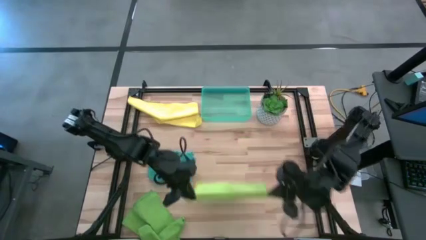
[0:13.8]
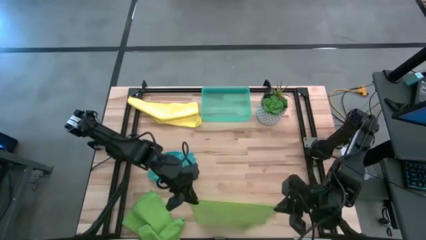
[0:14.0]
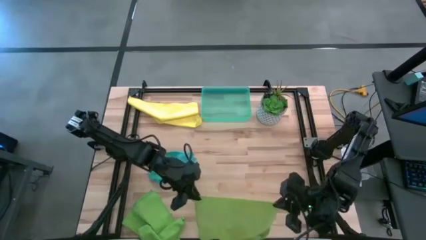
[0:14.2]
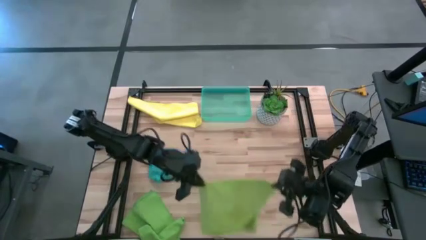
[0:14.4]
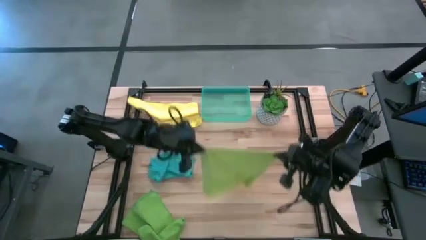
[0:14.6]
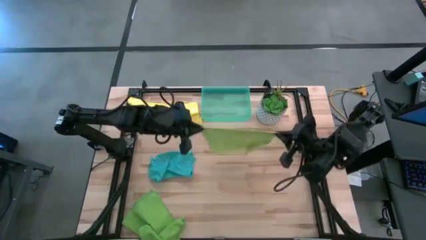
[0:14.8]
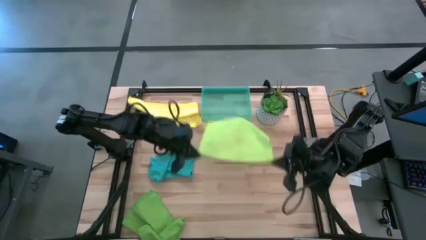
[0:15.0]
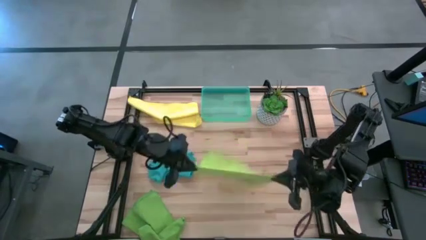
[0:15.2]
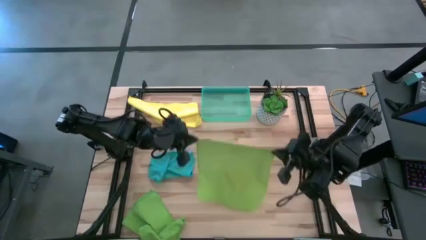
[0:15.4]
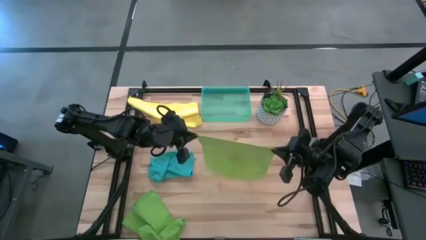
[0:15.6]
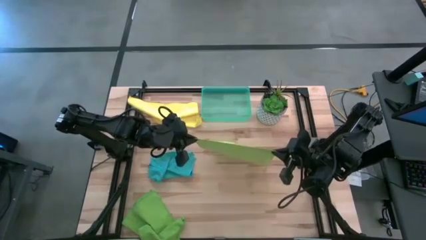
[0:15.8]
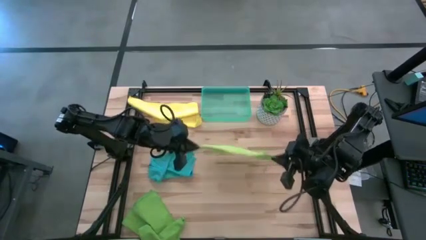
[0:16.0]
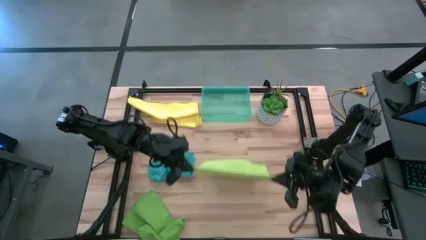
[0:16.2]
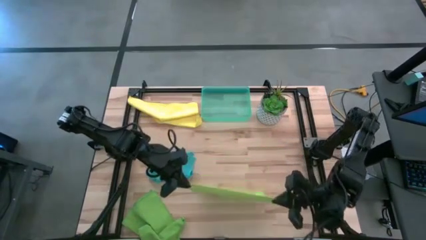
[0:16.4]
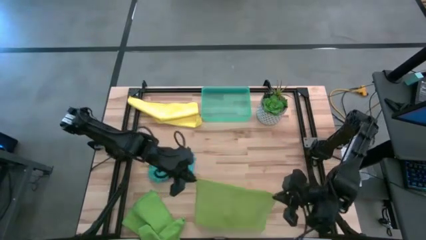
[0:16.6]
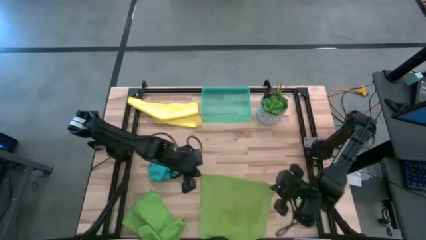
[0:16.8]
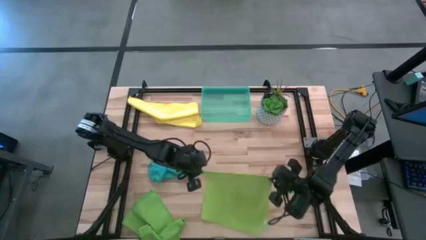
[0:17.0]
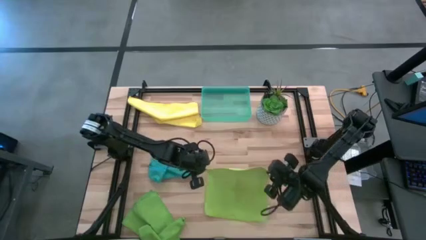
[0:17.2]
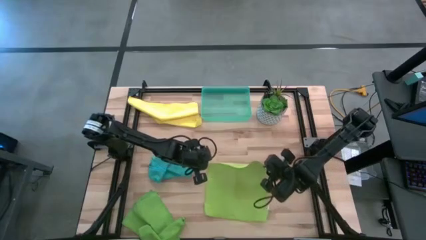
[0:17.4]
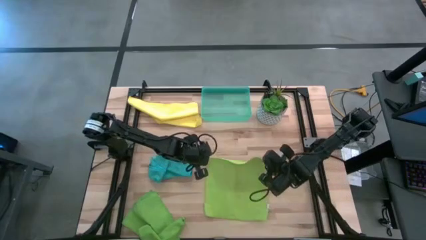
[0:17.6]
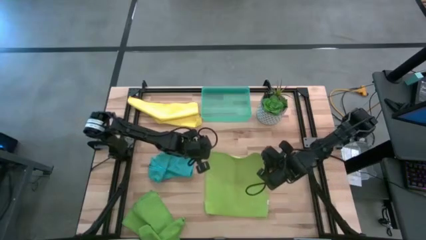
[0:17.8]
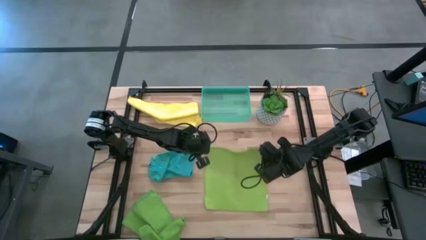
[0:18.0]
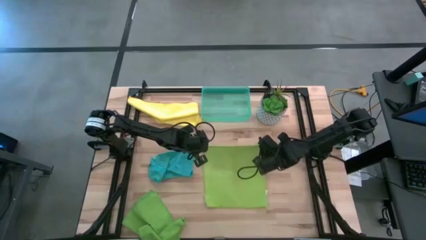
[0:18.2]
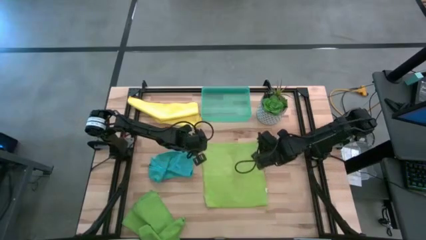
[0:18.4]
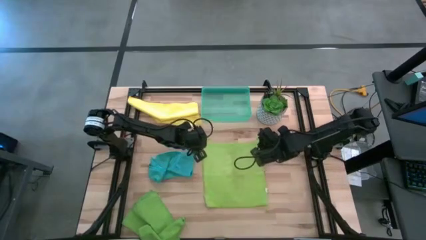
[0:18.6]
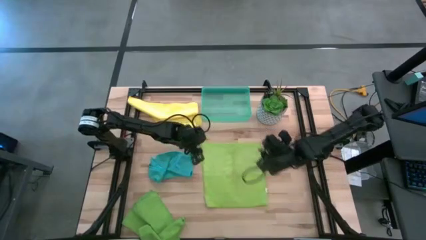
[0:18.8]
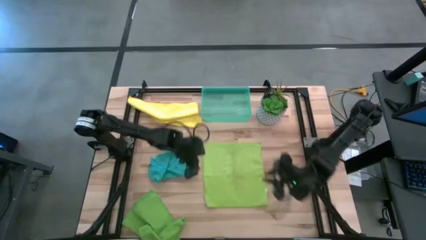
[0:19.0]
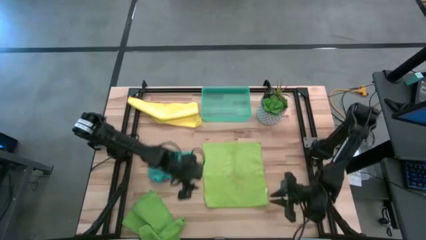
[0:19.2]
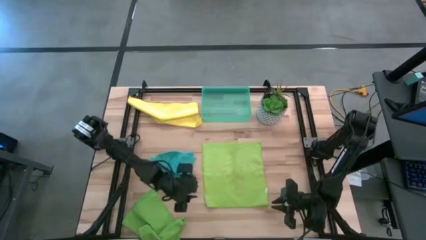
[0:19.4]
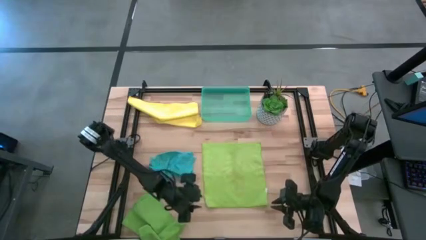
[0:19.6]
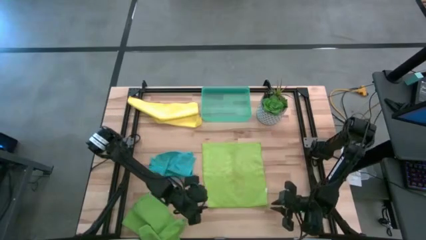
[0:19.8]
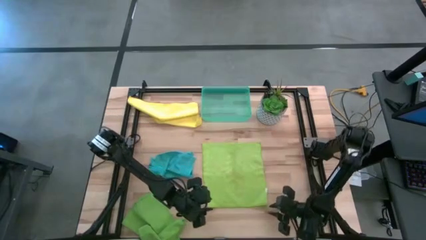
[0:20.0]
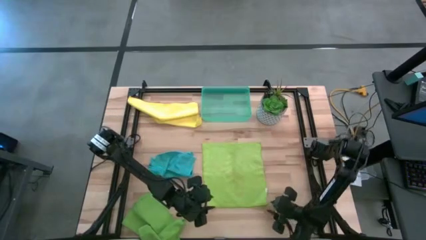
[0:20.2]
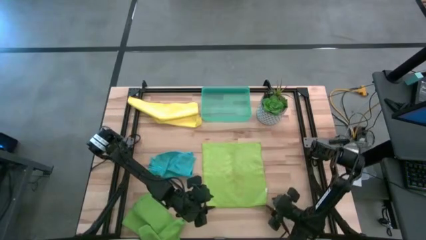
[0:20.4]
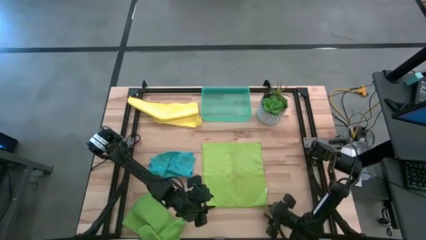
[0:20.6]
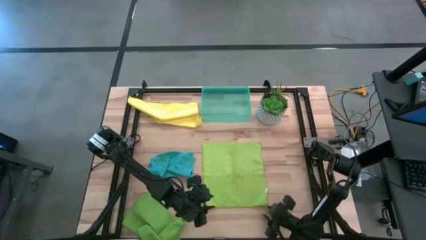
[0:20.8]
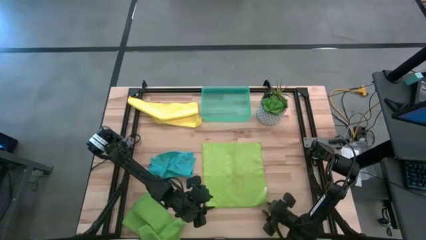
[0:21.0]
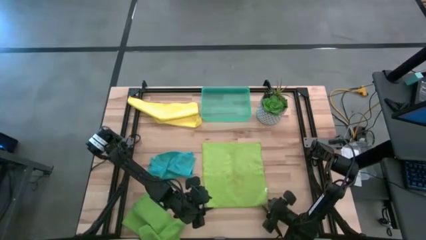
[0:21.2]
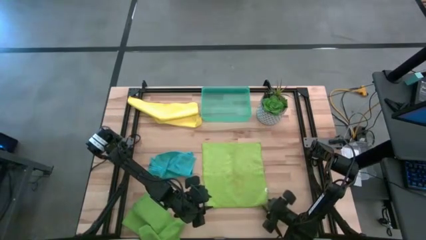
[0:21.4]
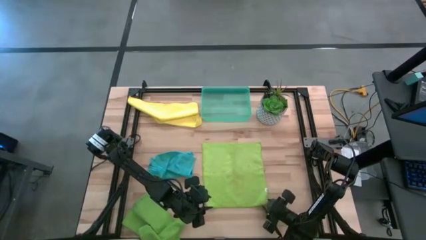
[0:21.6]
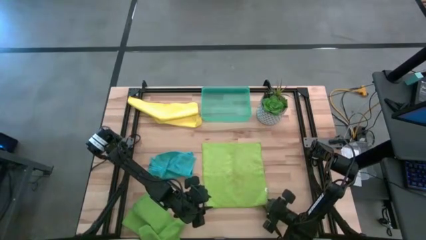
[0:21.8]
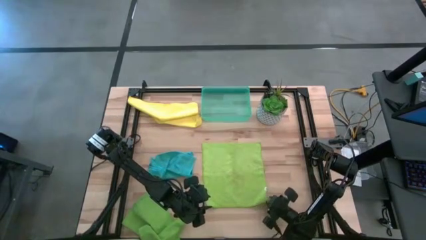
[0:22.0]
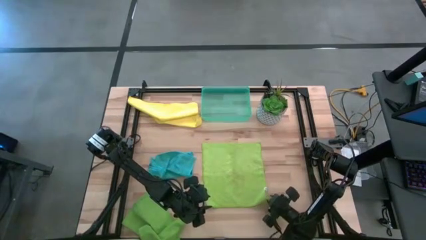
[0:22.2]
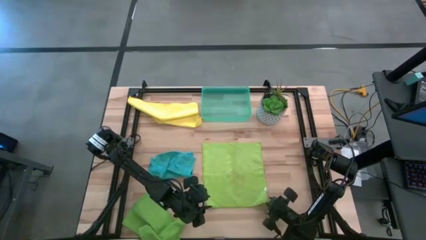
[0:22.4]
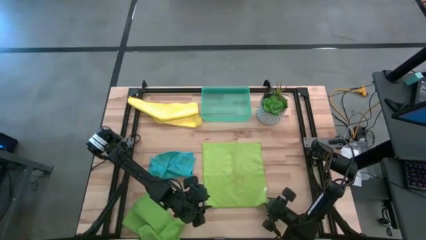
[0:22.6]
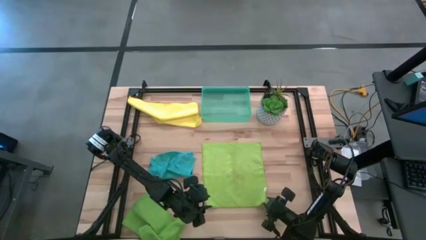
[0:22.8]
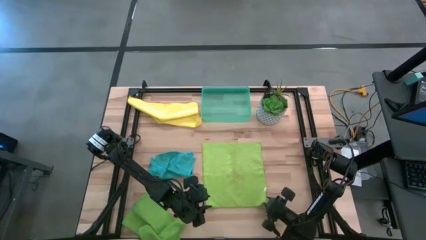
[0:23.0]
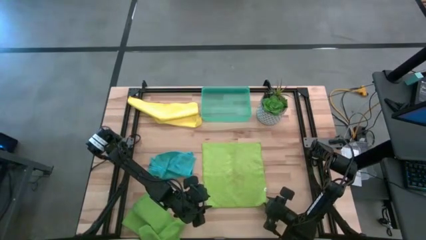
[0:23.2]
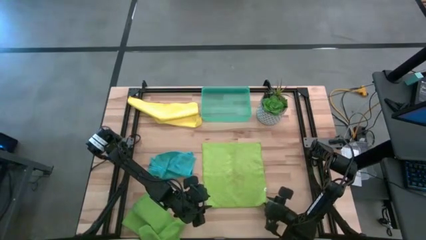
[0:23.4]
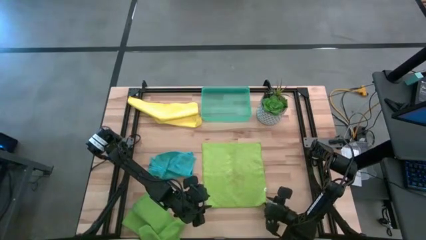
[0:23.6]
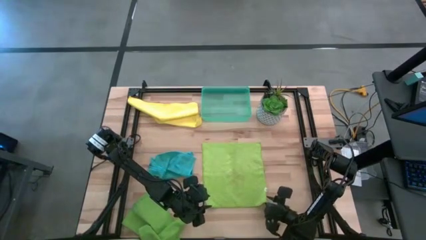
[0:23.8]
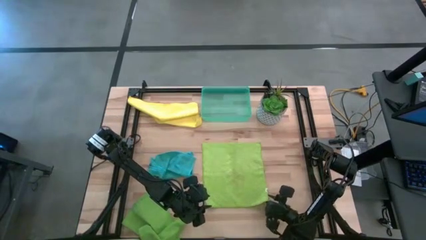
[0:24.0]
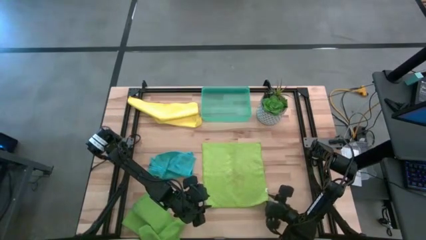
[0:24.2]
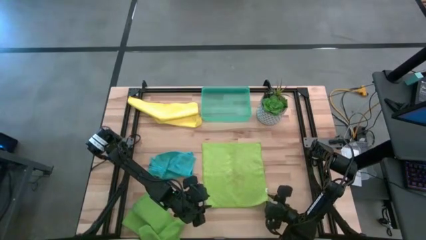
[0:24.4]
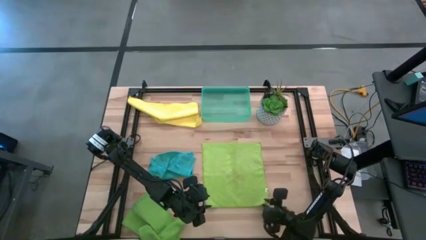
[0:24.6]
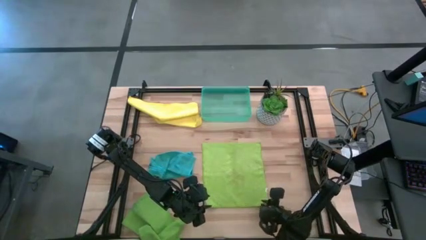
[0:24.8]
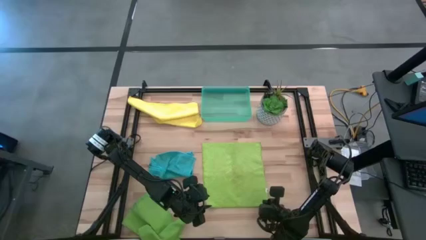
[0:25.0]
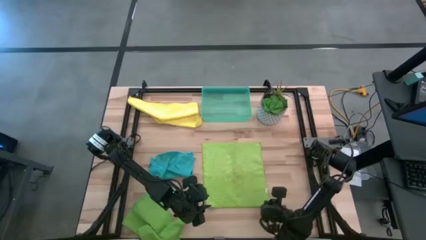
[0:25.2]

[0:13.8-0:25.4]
Task: Fold microfiber towels
Fold the light green microfiber cloth
